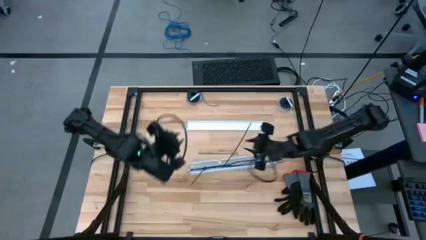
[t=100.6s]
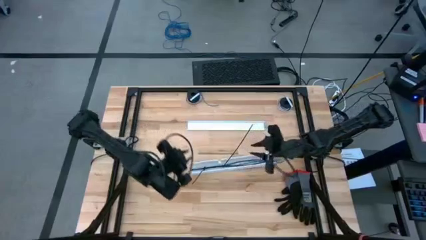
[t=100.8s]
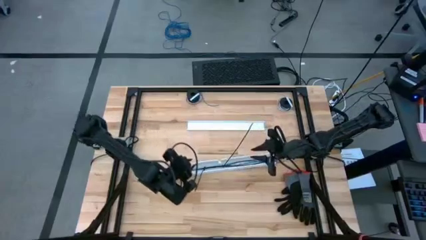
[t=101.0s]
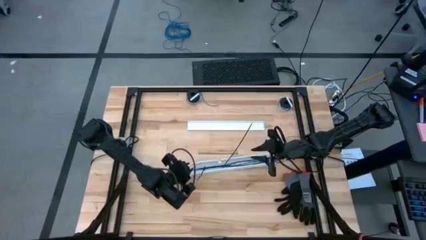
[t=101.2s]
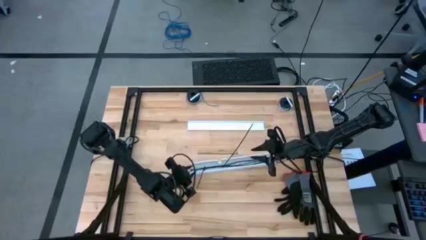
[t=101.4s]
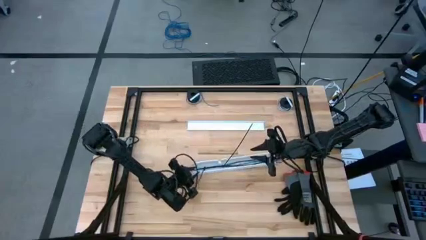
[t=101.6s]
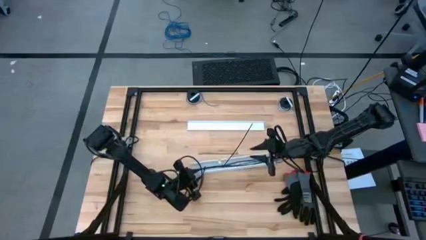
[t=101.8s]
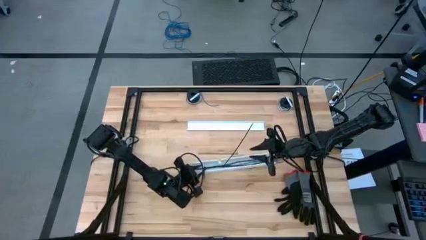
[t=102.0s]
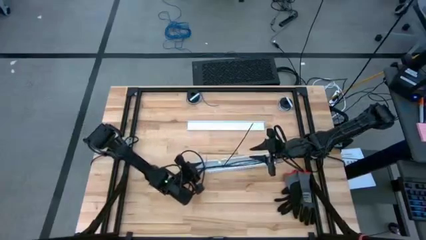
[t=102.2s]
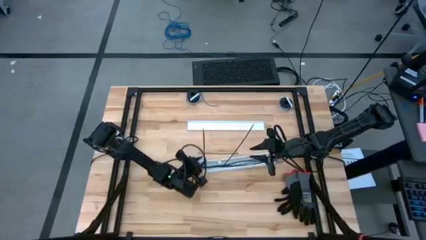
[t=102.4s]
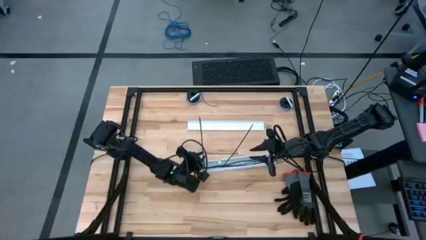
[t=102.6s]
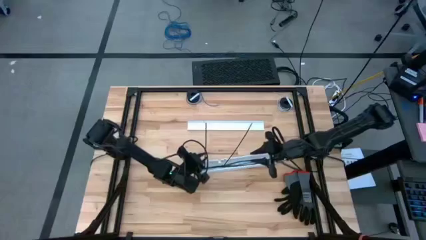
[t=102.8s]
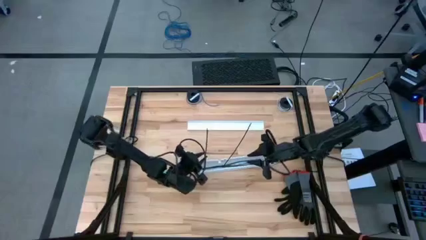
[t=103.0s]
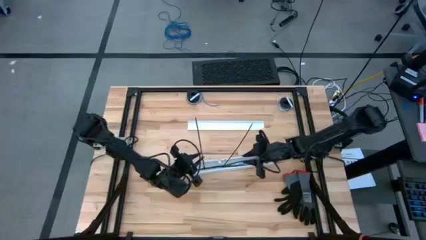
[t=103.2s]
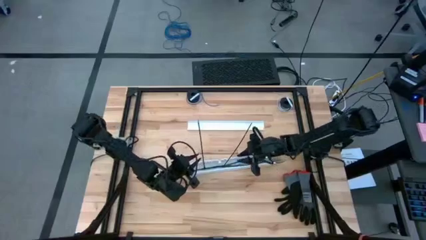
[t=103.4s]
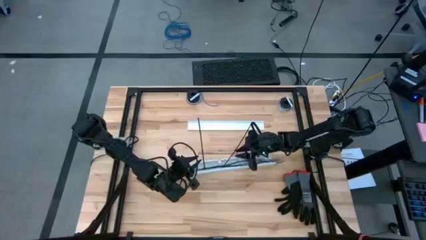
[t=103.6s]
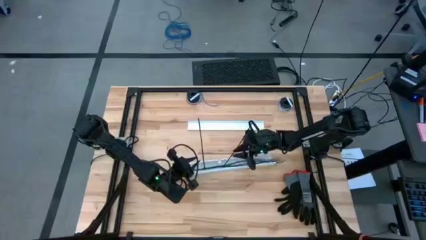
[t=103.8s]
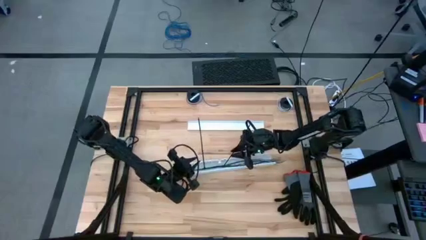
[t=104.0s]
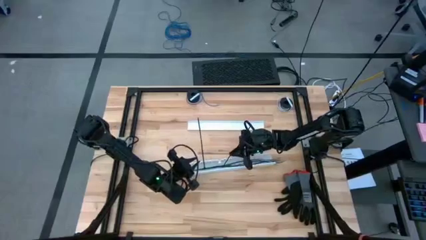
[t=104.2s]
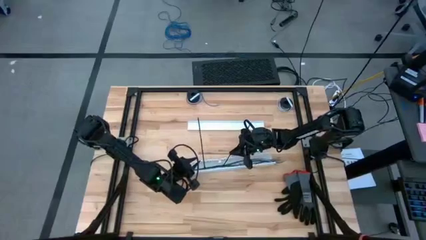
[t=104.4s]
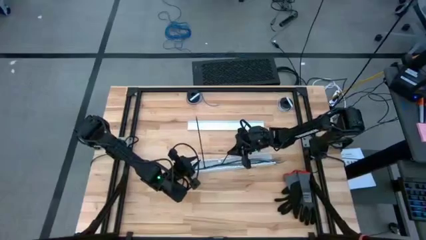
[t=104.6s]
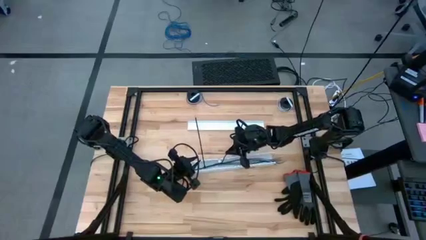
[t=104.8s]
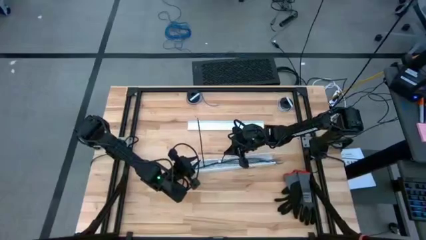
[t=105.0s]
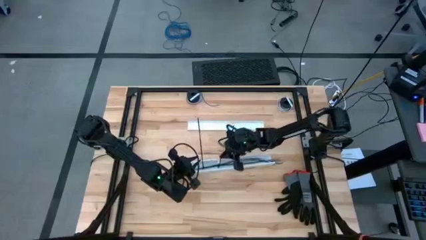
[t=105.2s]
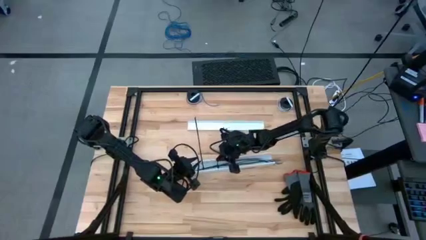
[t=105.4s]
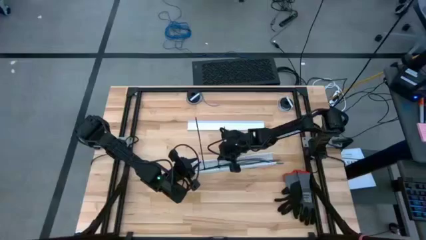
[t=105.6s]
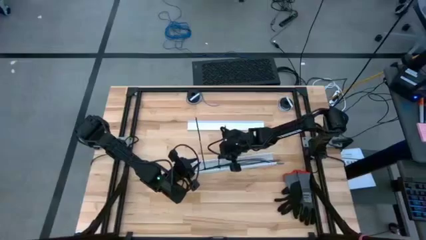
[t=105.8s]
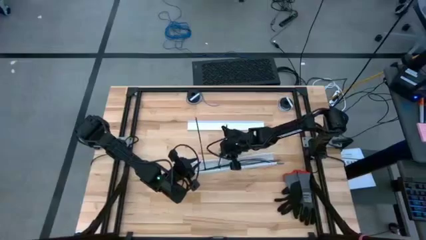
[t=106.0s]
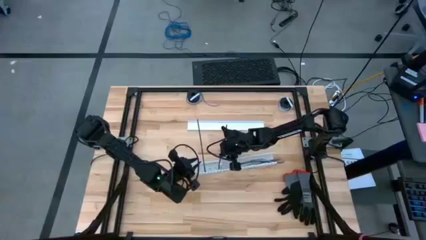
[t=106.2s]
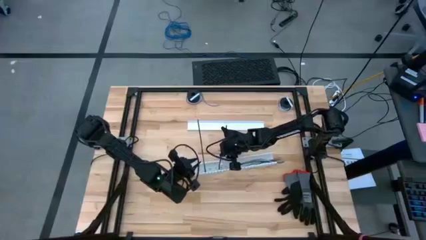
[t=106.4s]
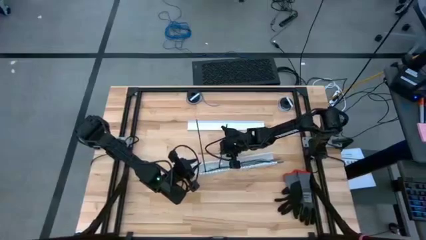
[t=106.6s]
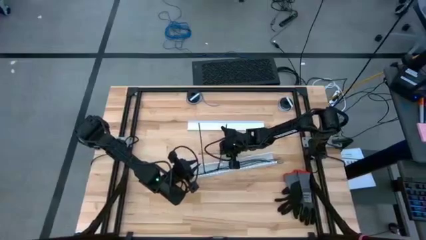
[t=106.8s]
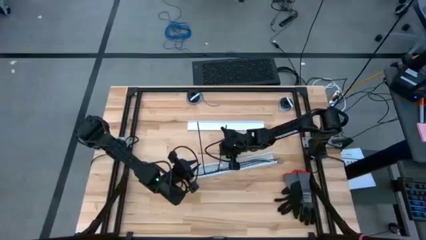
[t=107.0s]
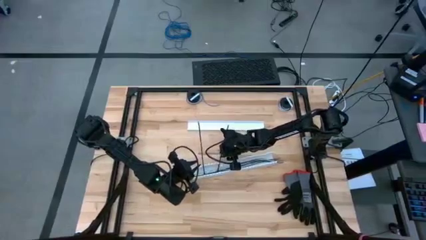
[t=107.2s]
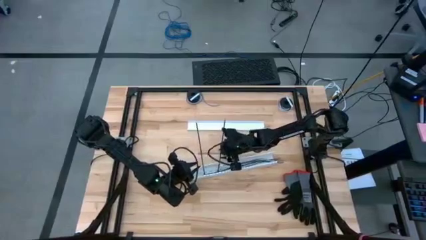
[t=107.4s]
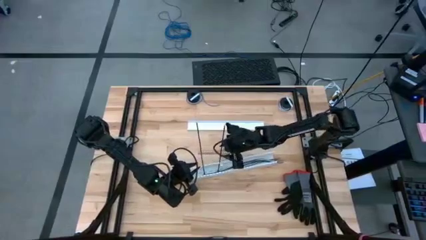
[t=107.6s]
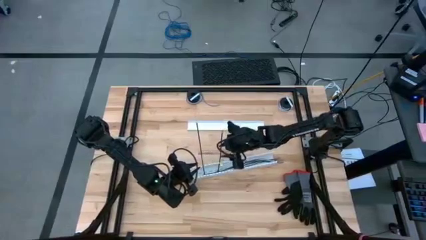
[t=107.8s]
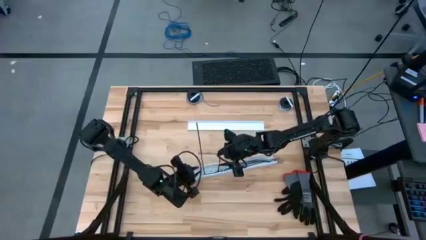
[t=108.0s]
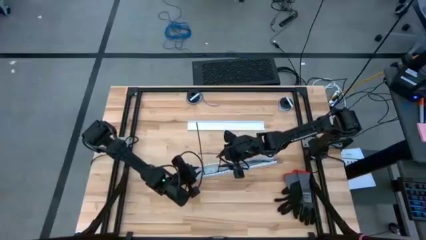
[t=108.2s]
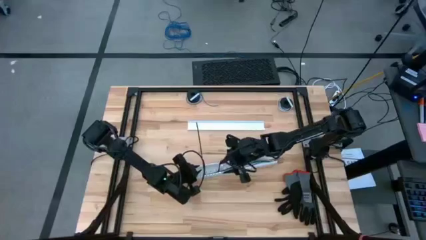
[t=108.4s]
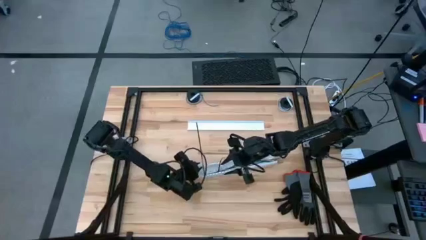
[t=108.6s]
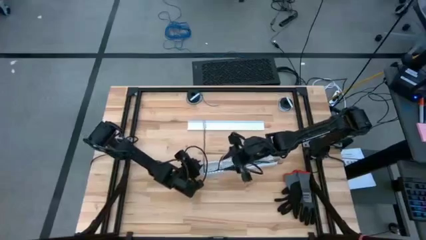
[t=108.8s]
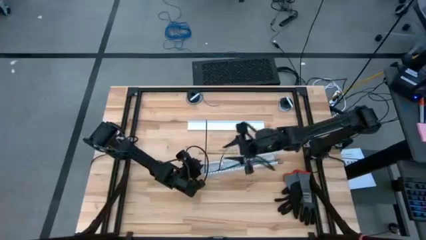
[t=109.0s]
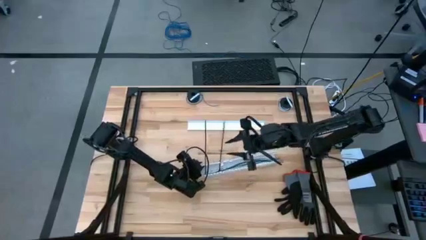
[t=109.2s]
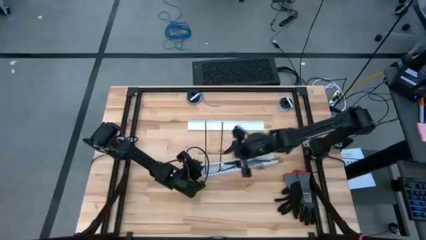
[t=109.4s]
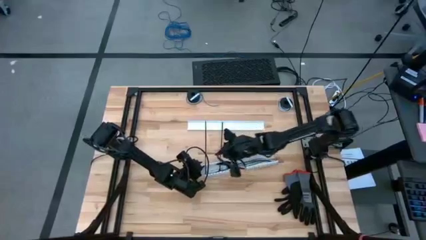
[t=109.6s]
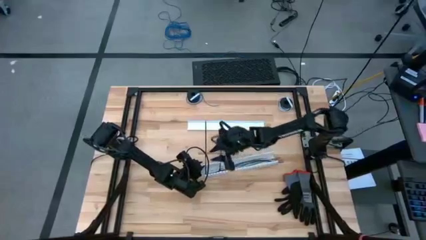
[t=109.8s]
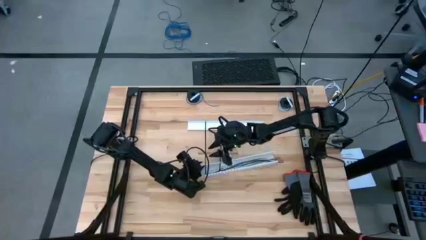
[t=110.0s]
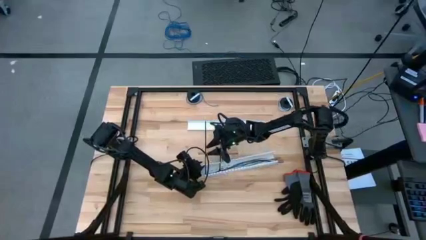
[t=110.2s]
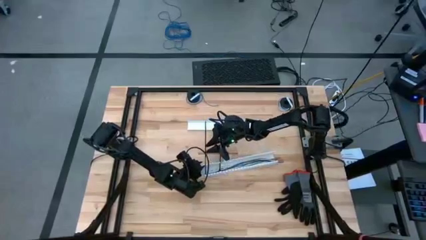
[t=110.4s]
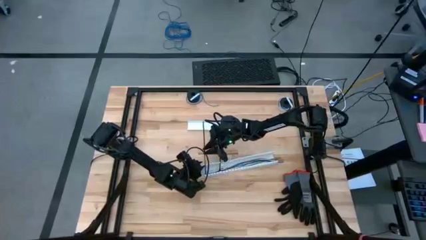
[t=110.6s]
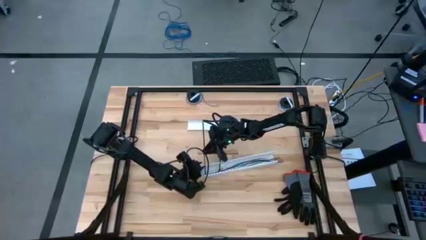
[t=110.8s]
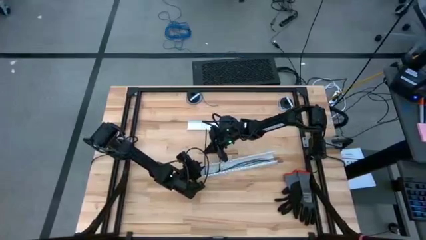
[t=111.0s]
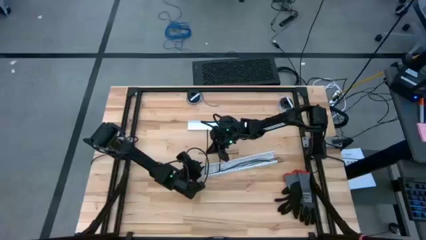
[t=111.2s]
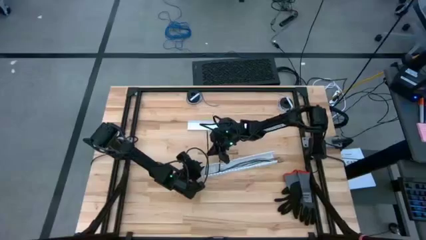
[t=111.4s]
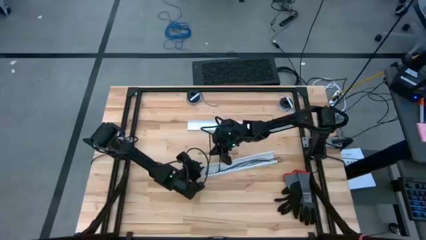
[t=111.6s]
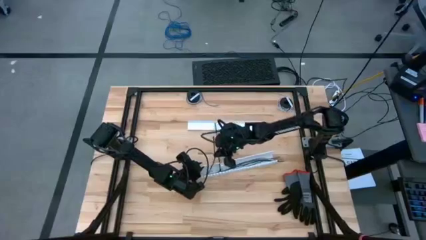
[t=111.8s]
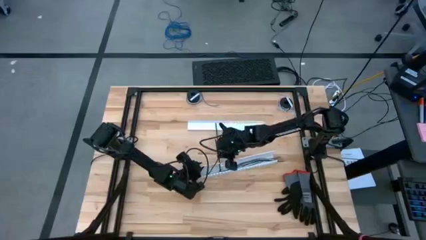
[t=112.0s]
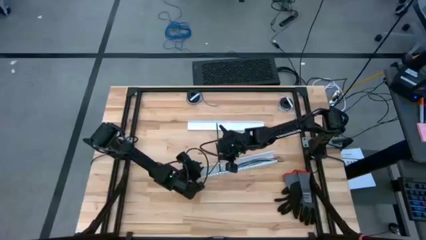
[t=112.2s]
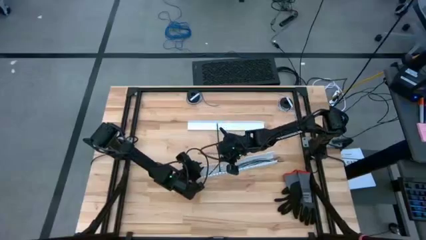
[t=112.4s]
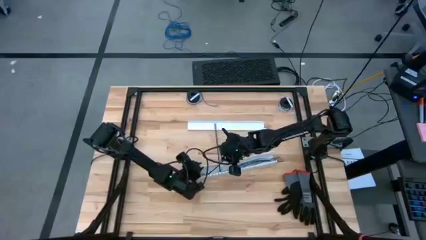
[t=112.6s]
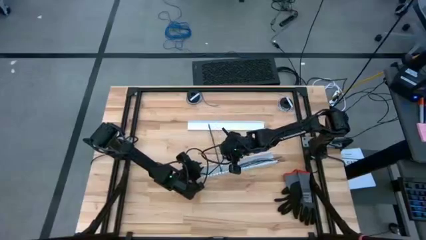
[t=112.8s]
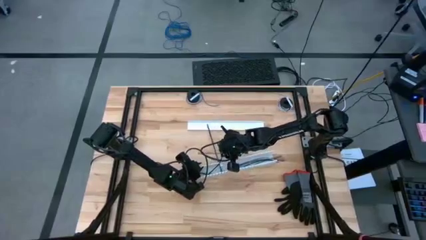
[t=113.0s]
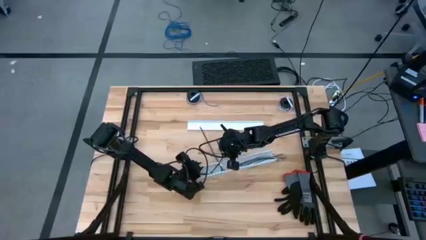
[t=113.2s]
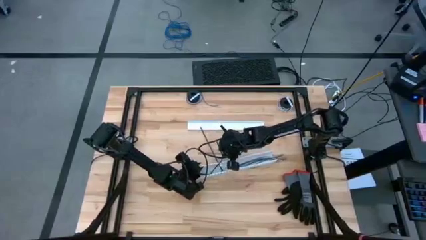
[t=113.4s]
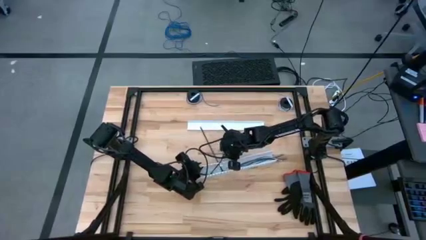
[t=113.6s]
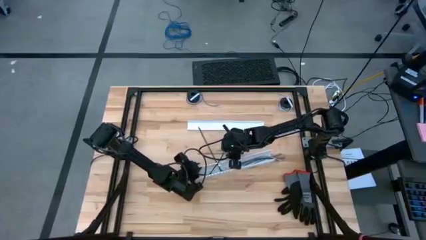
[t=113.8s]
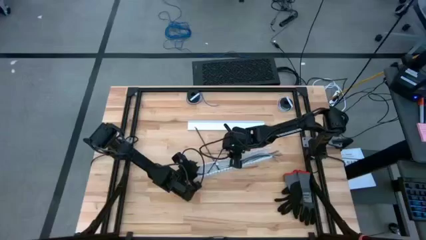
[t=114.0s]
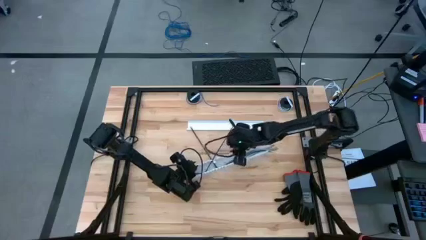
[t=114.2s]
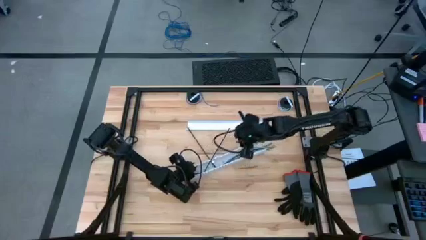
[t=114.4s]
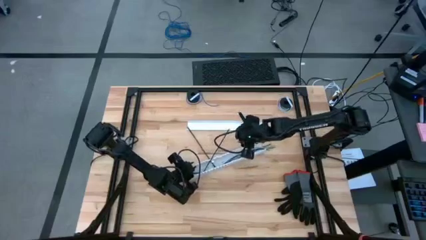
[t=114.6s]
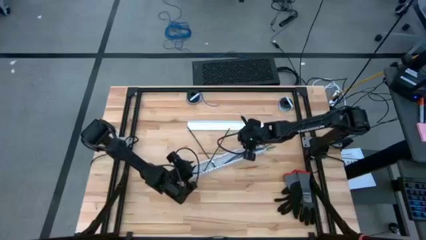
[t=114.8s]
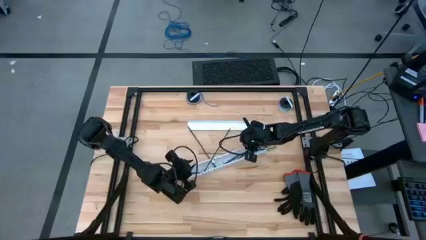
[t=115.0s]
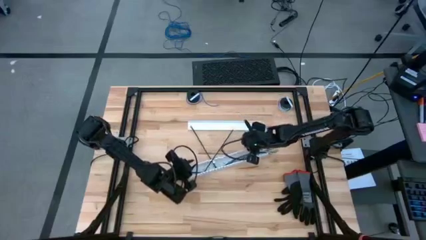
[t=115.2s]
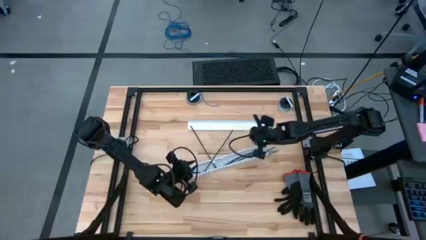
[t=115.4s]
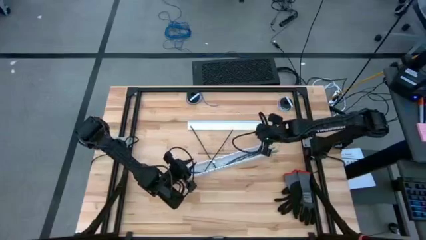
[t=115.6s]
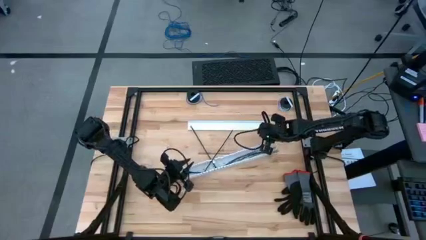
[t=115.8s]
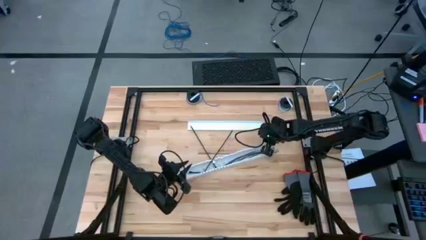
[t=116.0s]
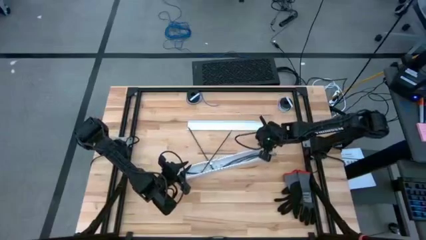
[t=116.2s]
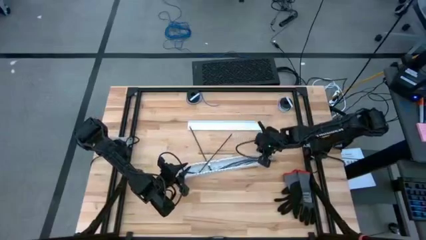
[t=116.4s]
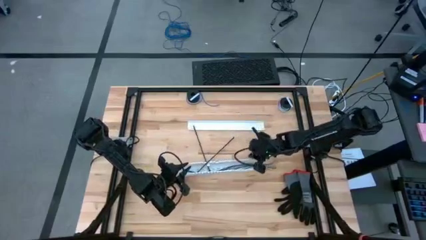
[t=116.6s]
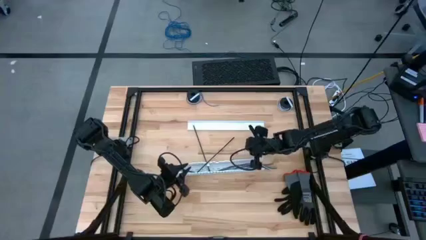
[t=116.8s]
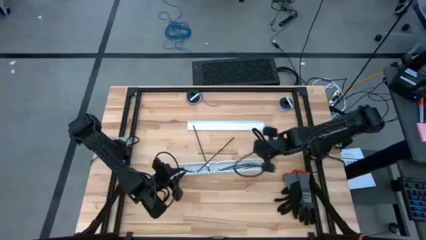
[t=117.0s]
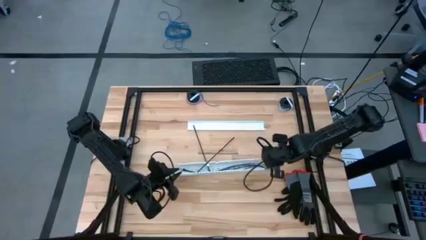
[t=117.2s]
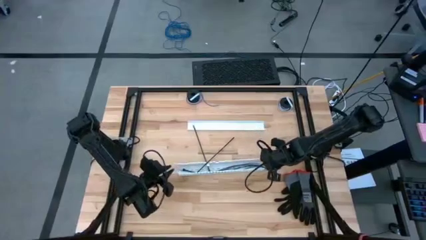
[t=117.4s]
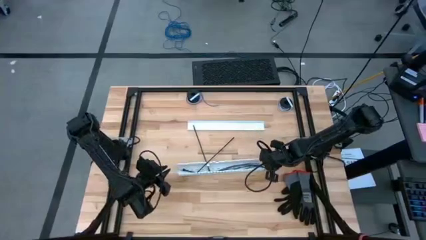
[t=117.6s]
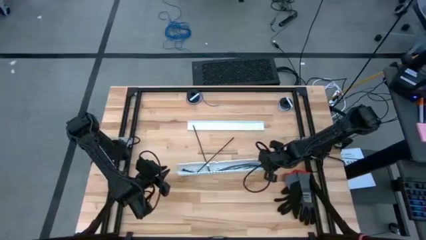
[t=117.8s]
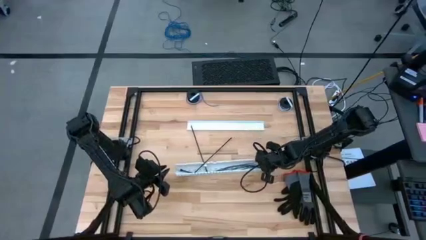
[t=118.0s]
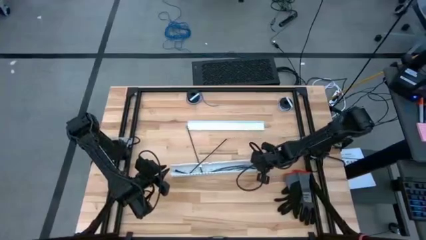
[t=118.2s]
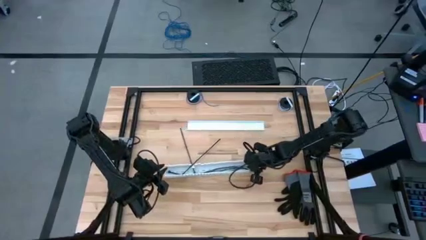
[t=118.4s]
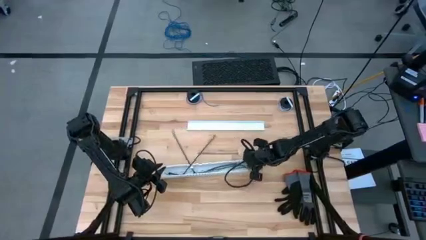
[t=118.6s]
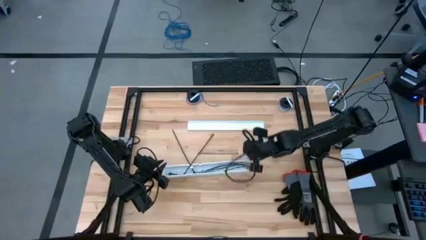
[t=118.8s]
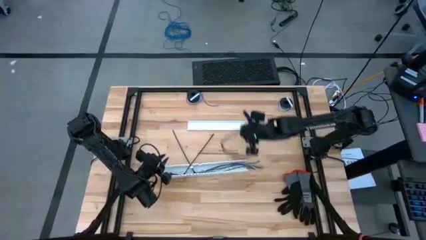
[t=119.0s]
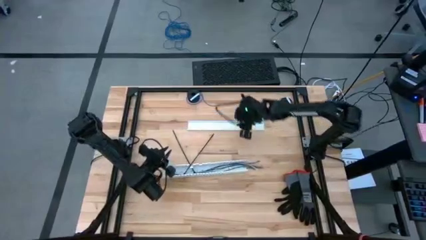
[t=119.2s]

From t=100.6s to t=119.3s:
Task: Ziptie cables
Put the cable wires on the cable white duct tray
